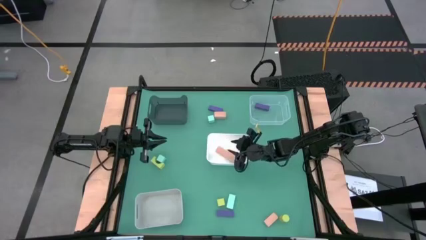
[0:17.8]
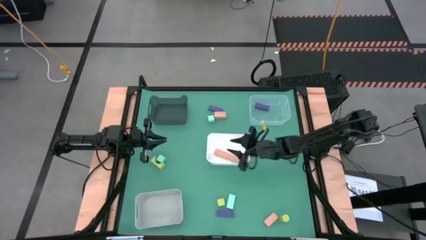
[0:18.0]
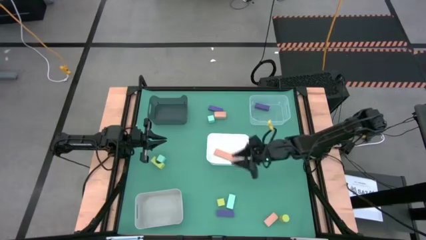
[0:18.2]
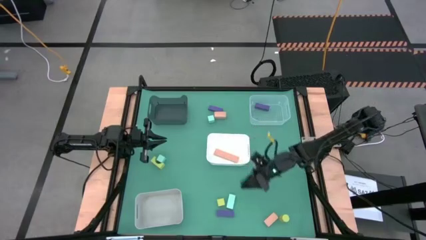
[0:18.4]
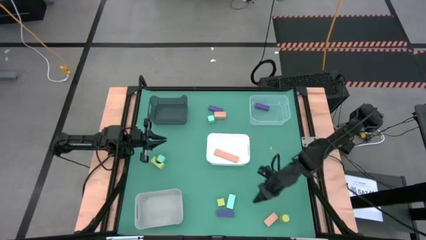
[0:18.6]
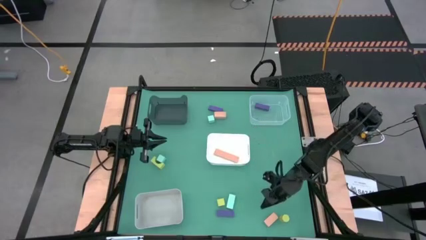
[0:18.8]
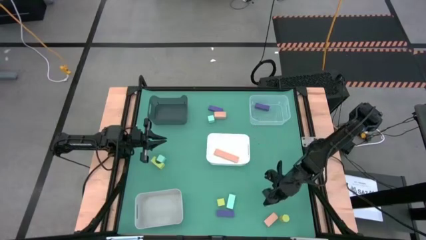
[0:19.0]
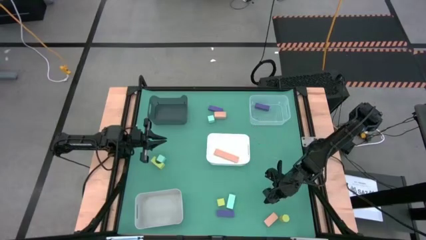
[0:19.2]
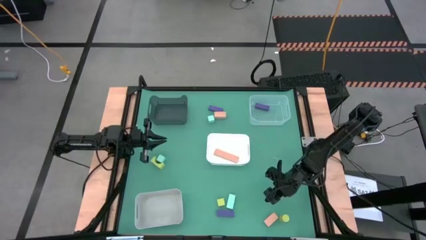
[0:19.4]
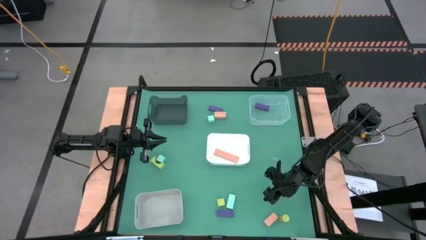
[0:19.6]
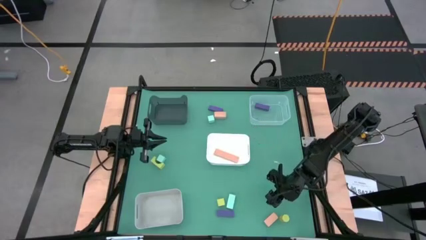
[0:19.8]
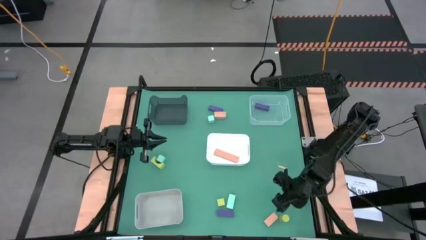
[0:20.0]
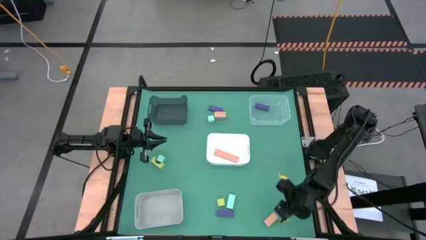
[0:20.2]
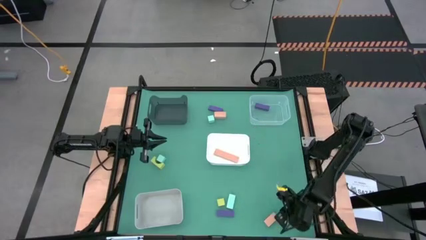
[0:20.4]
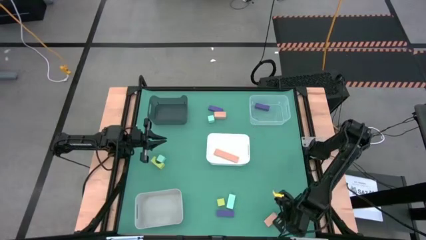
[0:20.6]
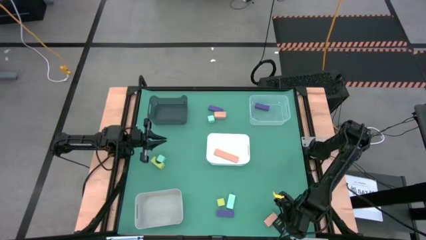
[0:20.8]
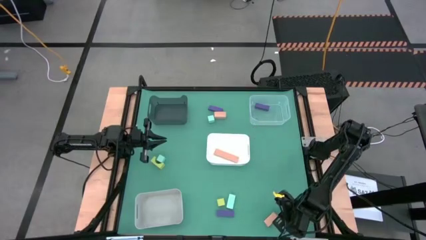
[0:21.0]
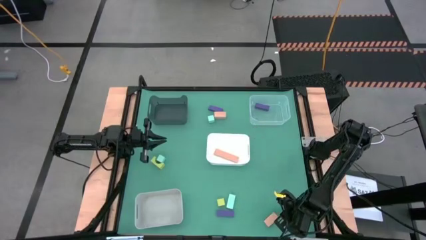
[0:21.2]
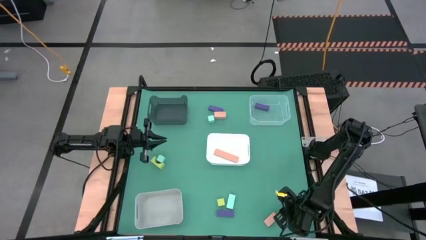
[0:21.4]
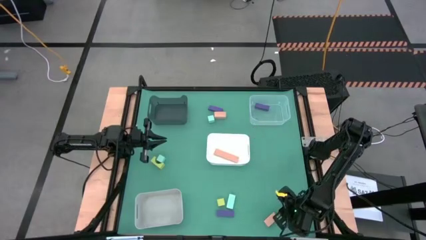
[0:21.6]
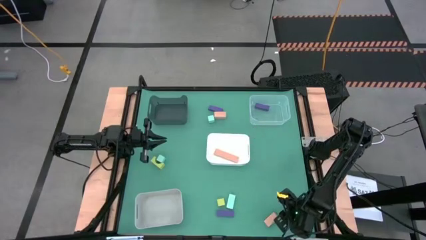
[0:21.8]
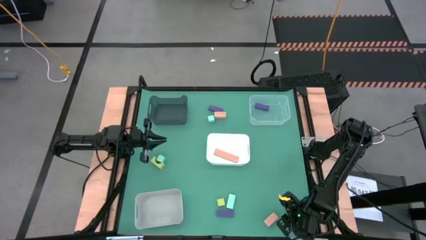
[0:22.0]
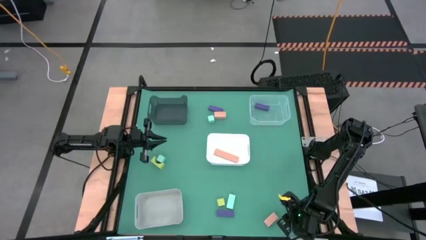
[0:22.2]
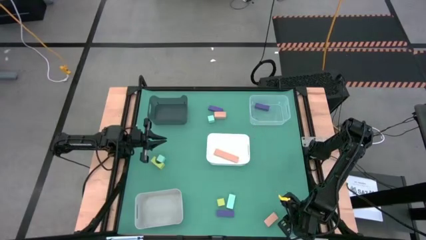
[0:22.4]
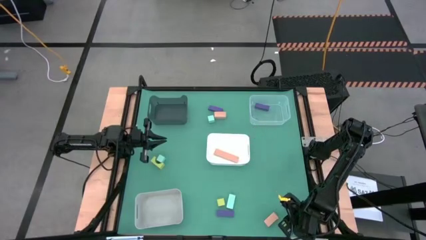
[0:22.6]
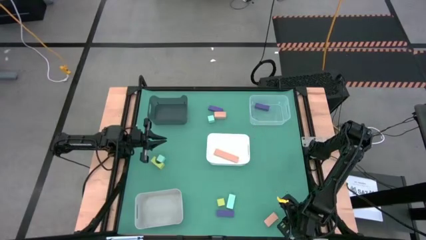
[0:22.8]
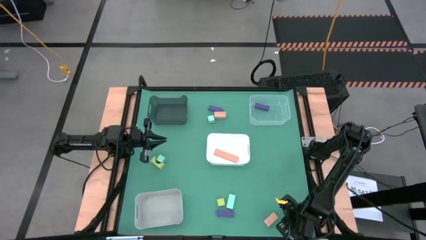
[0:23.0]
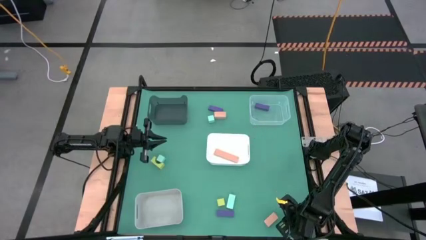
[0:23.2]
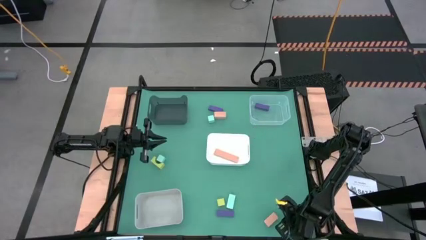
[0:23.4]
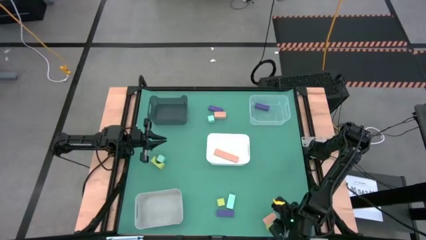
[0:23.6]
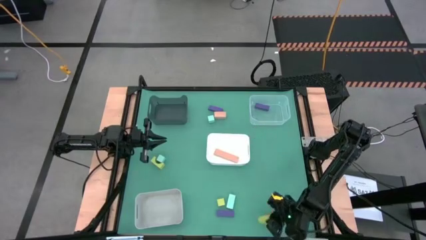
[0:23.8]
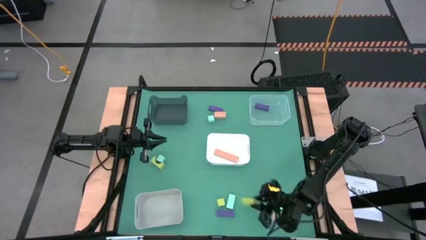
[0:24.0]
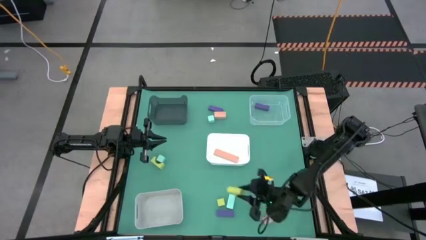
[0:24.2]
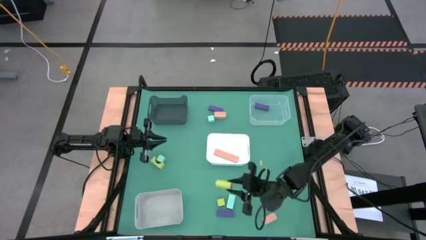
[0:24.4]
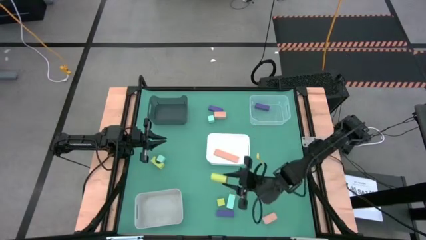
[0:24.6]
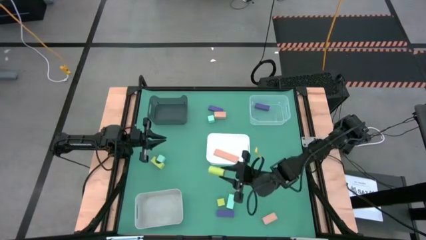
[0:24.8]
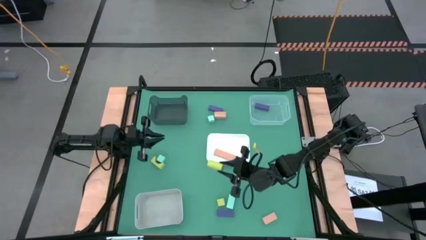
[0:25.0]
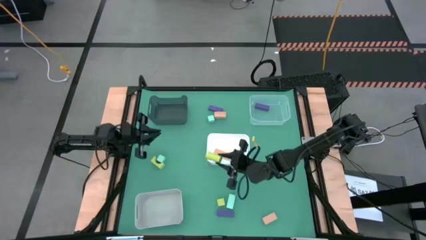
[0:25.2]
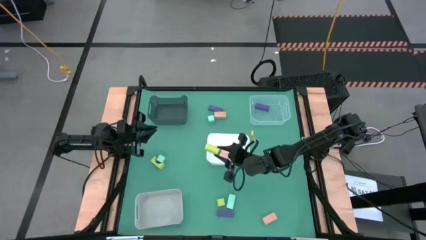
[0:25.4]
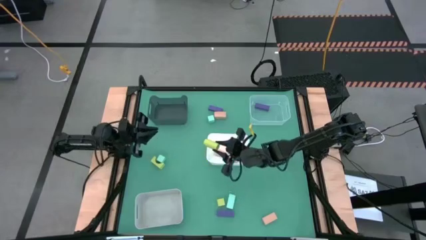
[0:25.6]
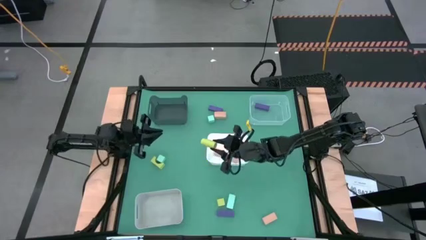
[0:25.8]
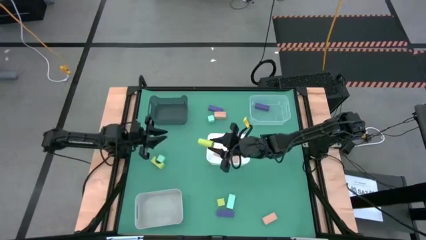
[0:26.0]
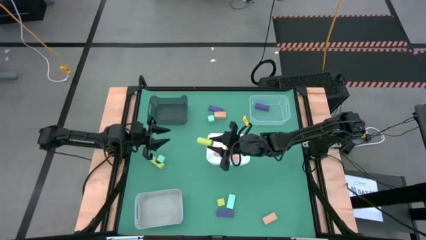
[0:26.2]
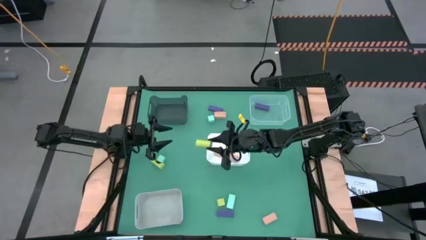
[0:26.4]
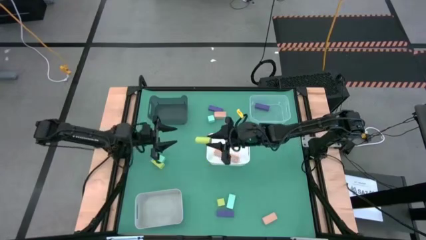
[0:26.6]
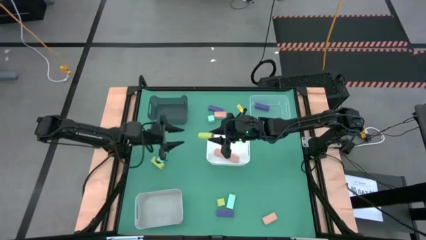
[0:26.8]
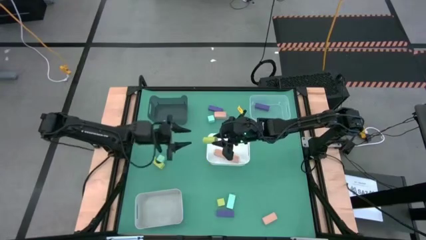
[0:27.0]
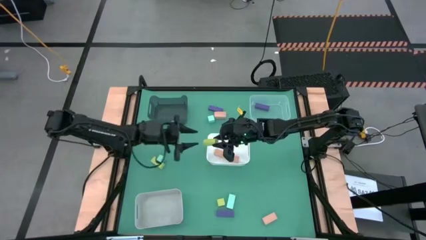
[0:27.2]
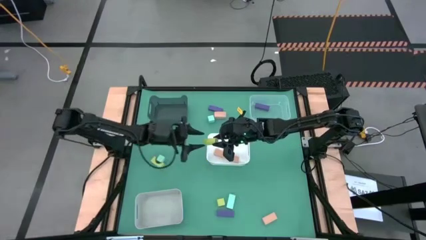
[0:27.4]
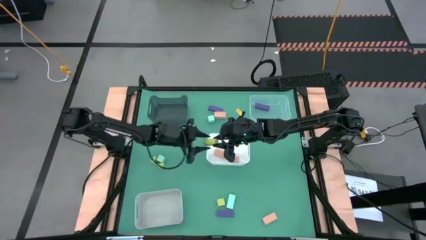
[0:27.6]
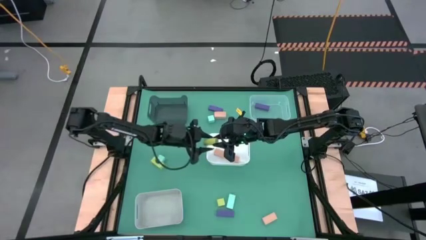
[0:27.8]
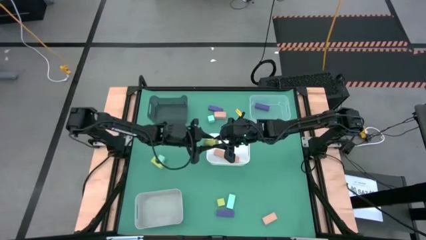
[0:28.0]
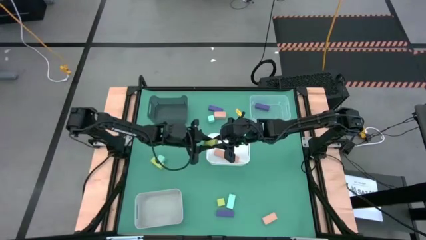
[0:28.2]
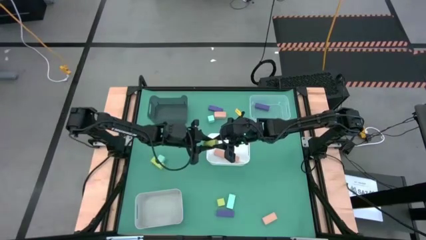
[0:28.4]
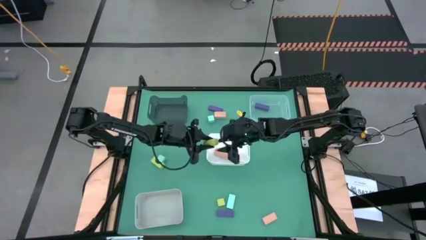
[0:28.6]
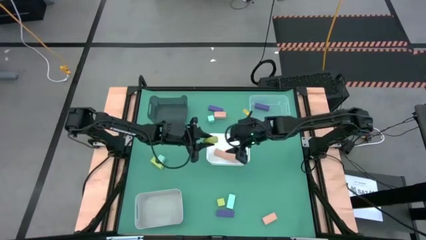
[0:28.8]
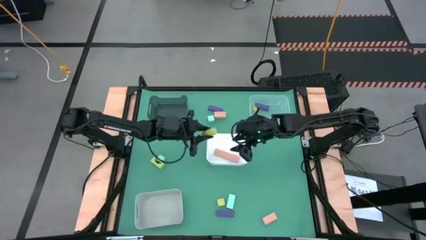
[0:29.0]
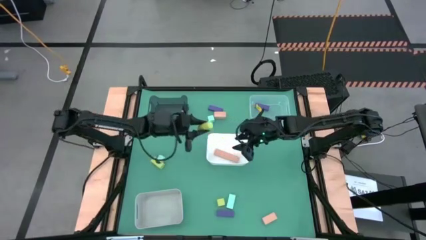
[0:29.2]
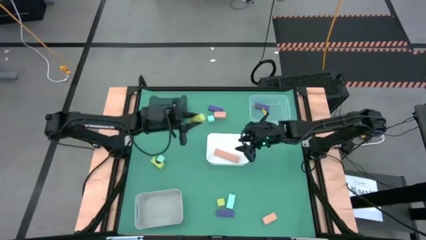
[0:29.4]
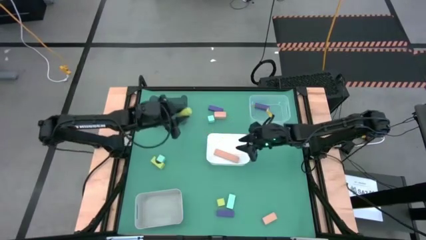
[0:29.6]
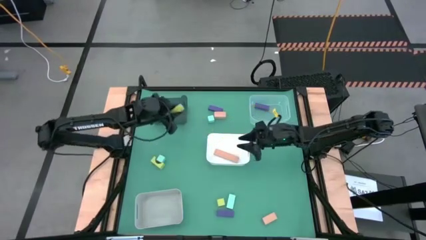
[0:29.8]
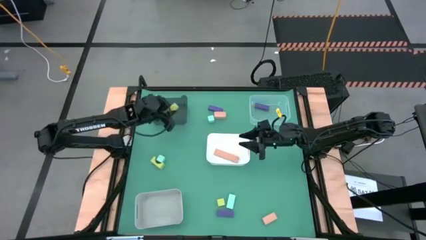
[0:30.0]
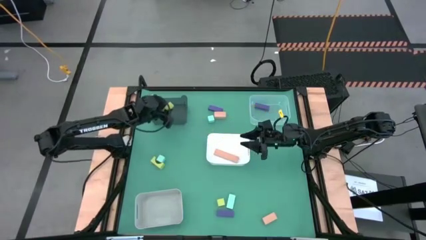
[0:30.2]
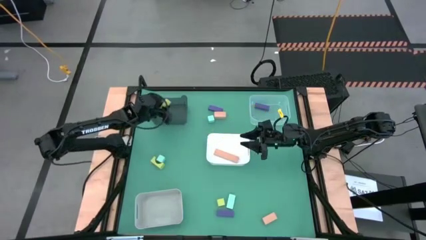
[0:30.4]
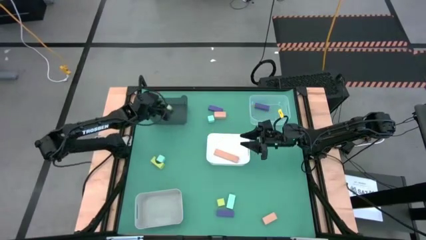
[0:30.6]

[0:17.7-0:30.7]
Task: Sort & place blocks by color
Put the bottom right green block into the black bin
